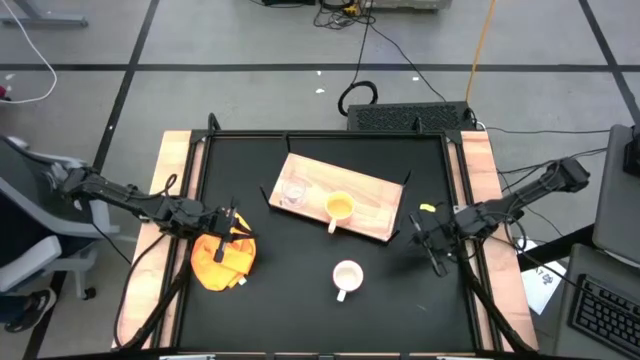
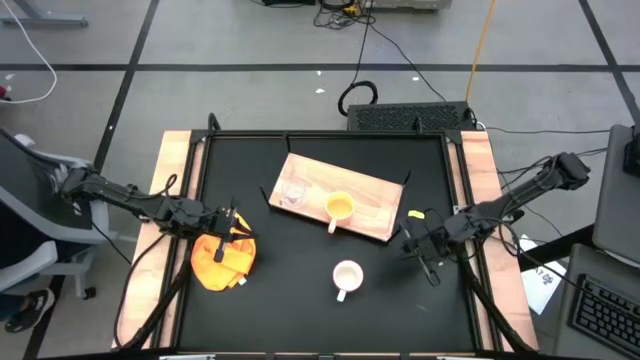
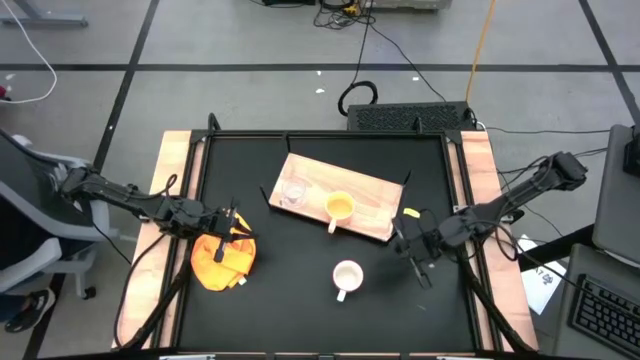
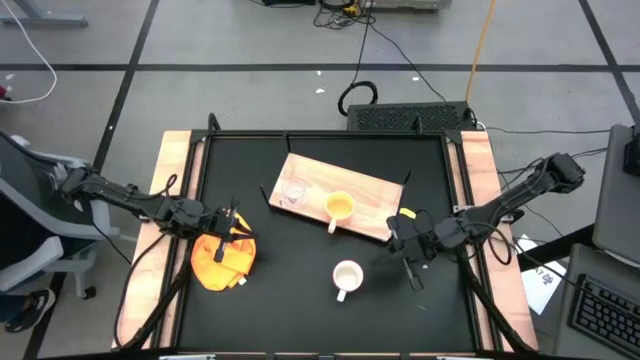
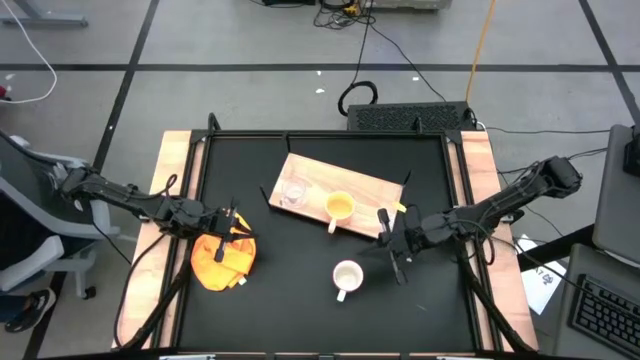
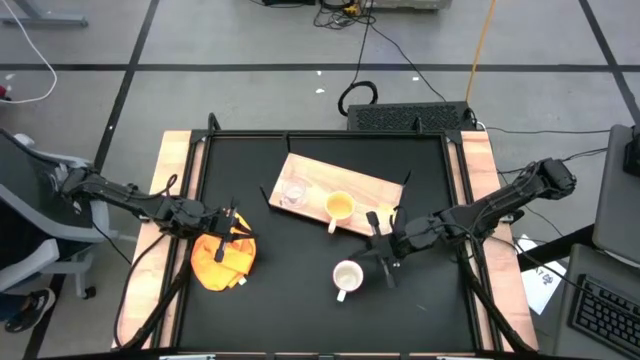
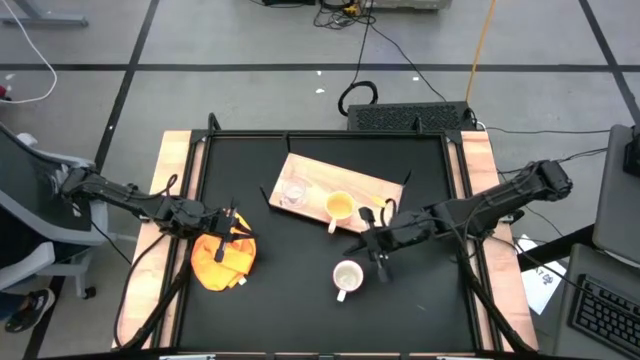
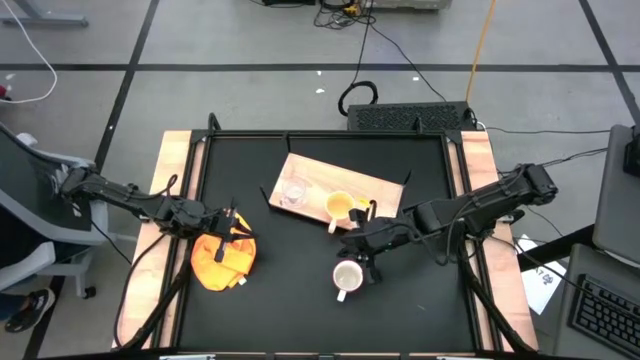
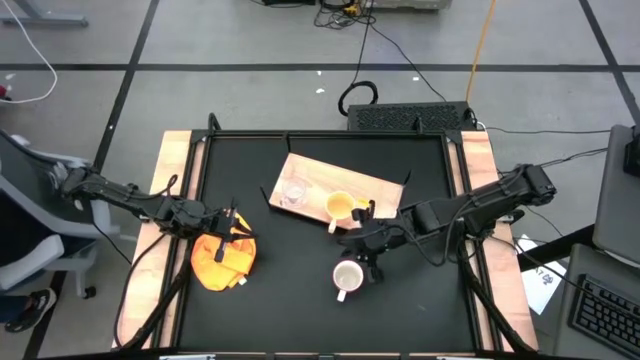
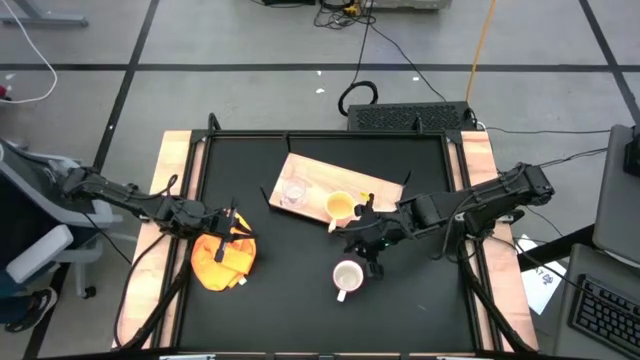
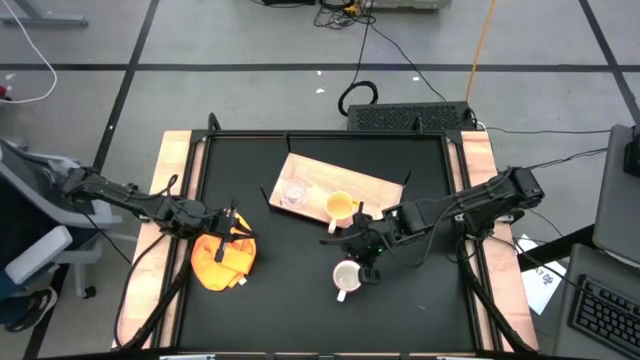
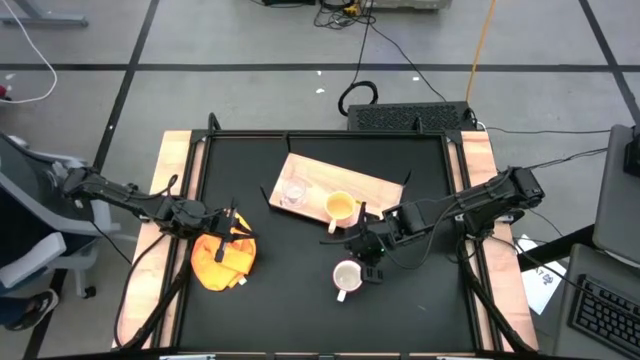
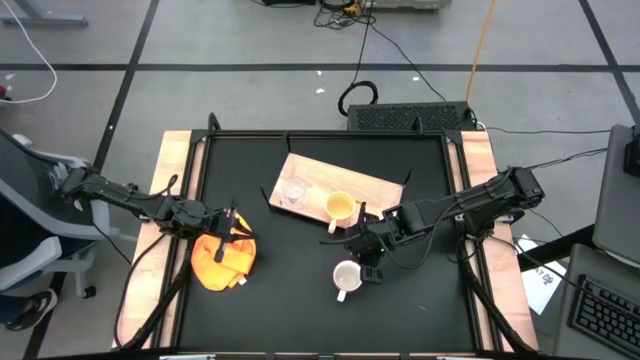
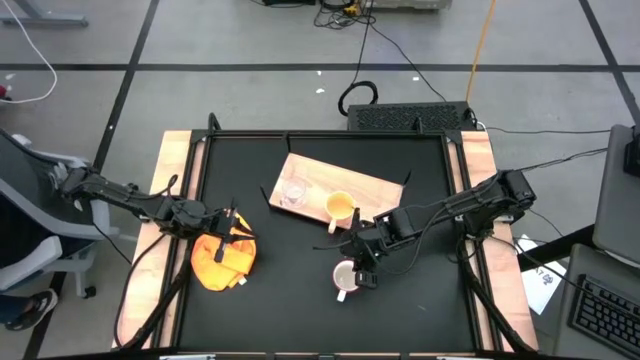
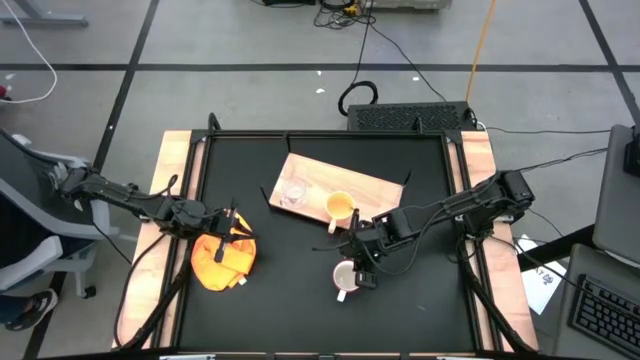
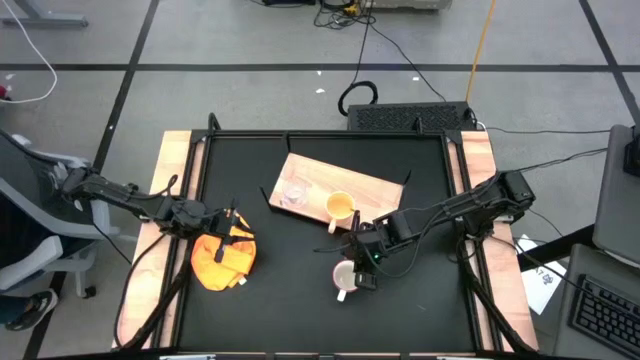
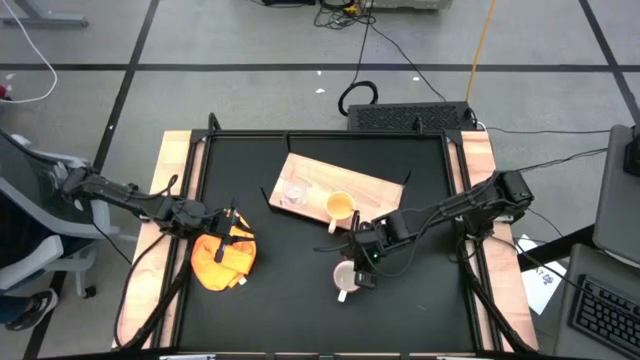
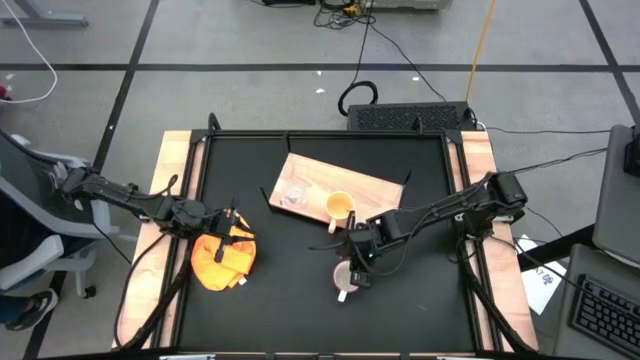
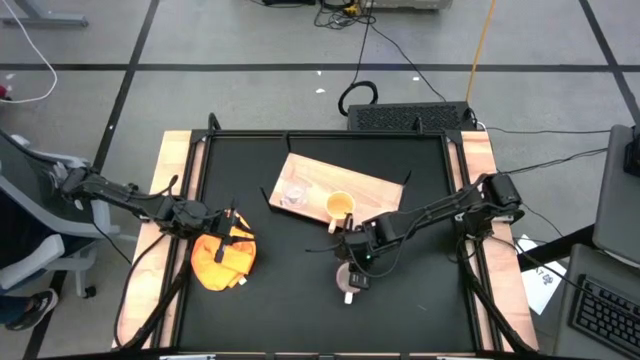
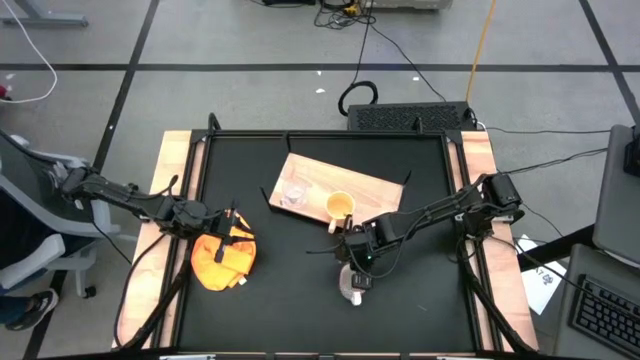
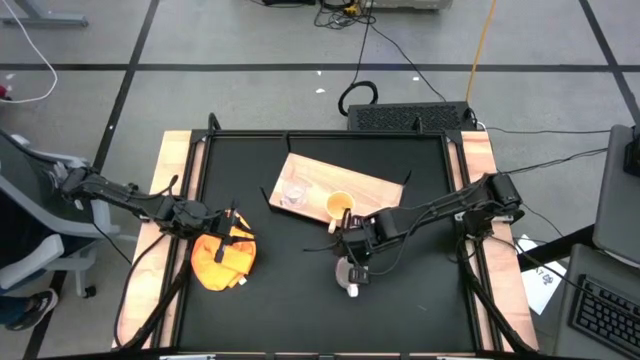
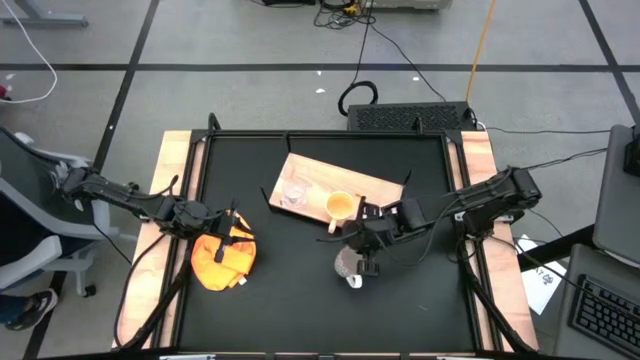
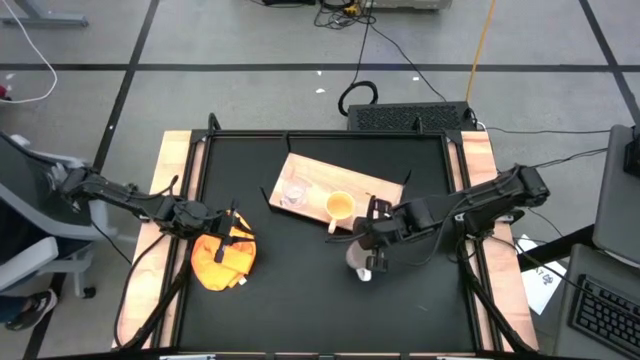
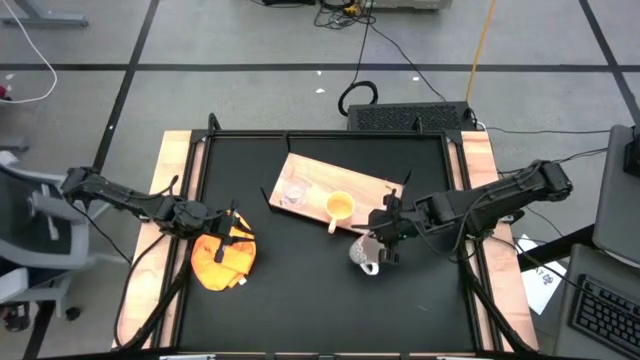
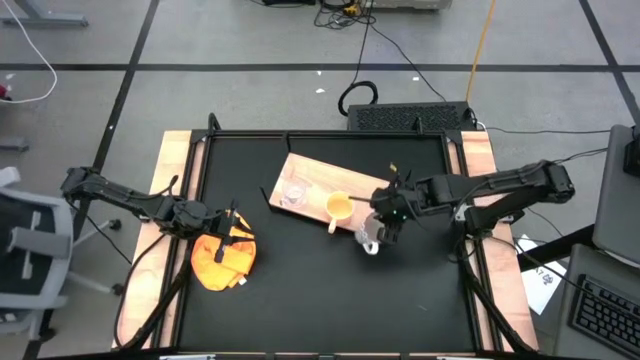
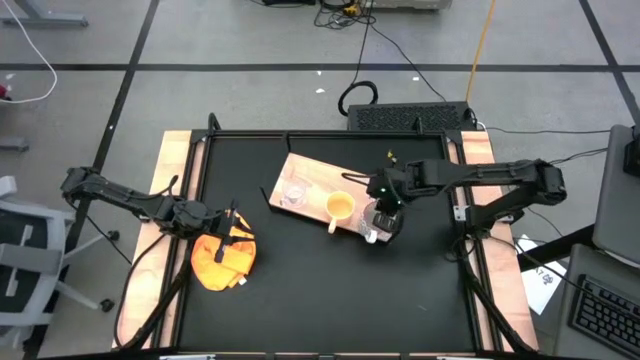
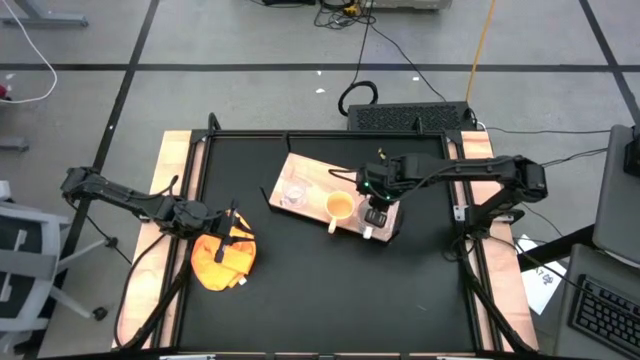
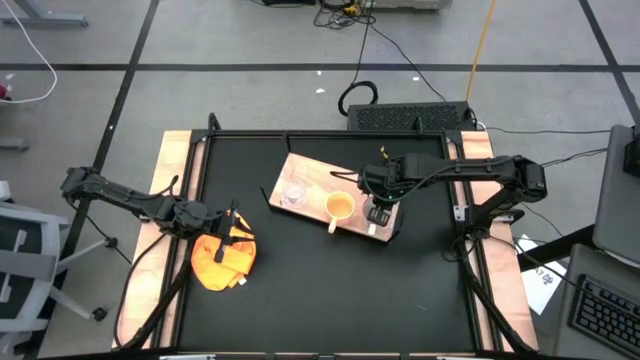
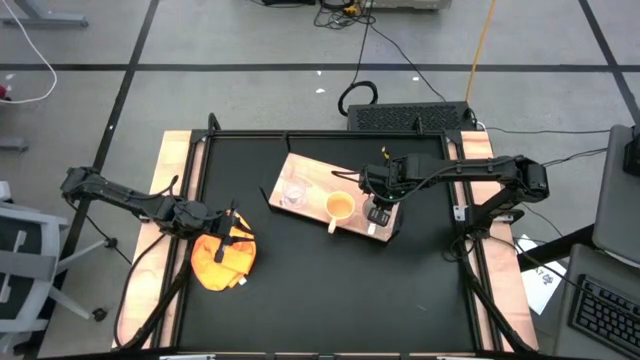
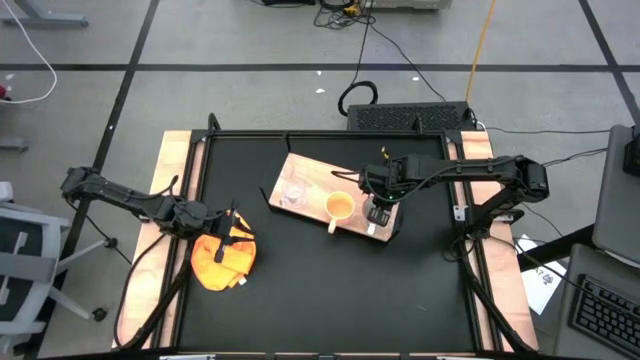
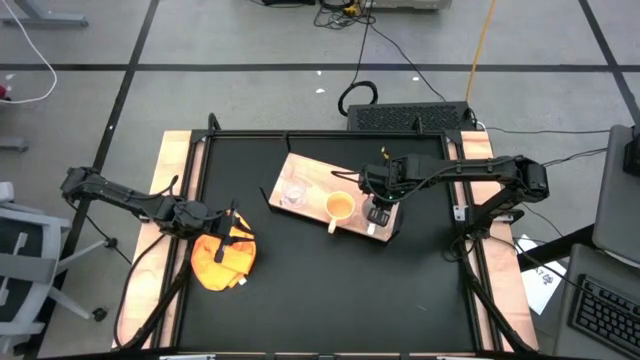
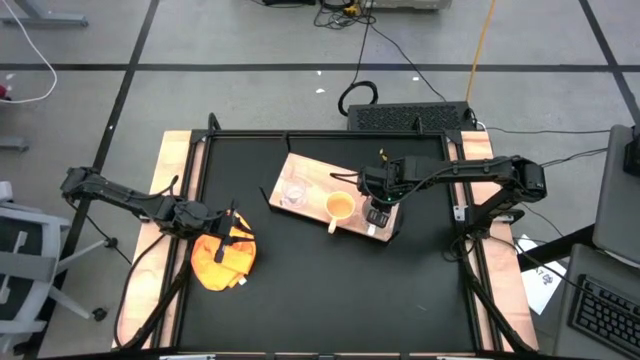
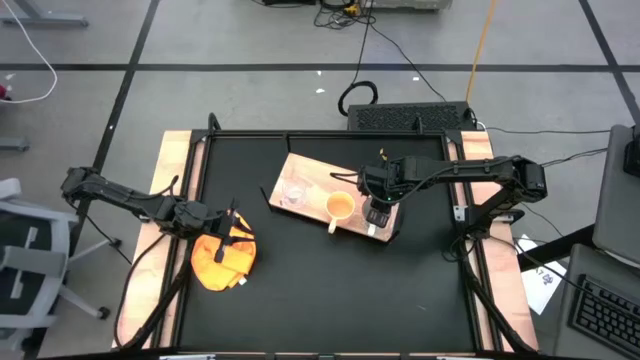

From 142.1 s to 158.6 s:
Task: Stack small to large cups/mugs on shelf
Put the gray patterned mug on the shelf
